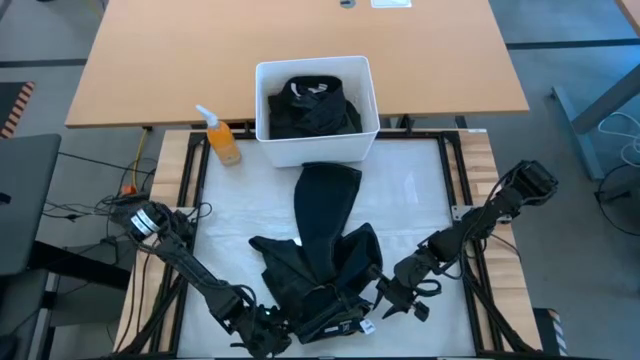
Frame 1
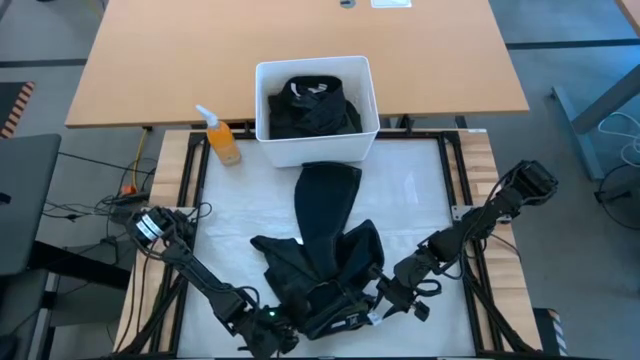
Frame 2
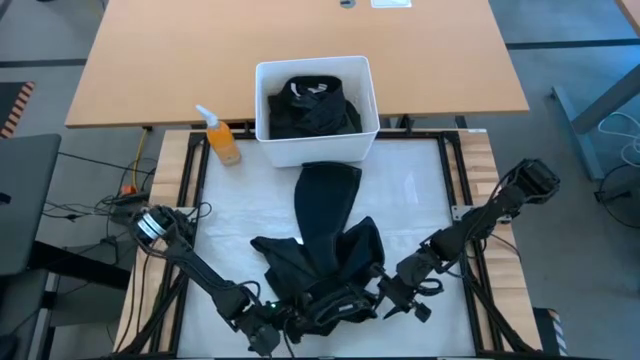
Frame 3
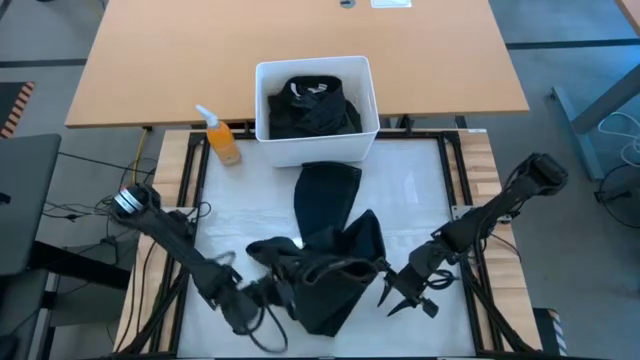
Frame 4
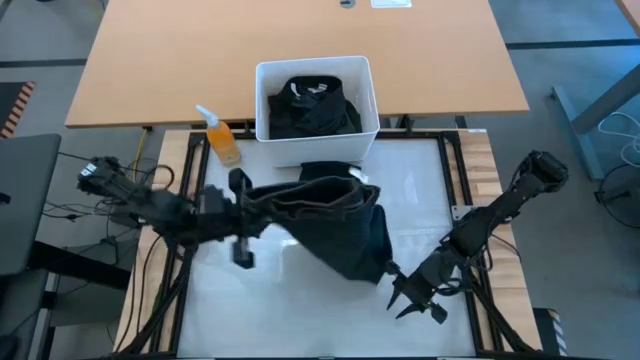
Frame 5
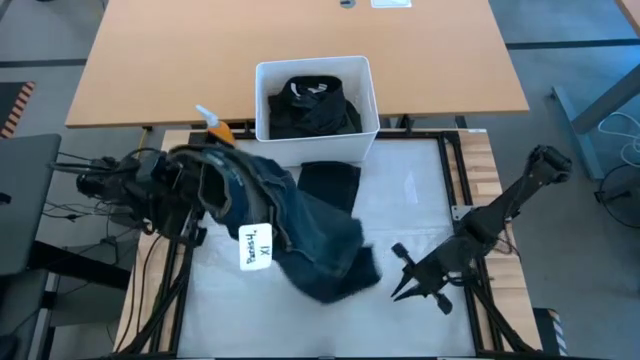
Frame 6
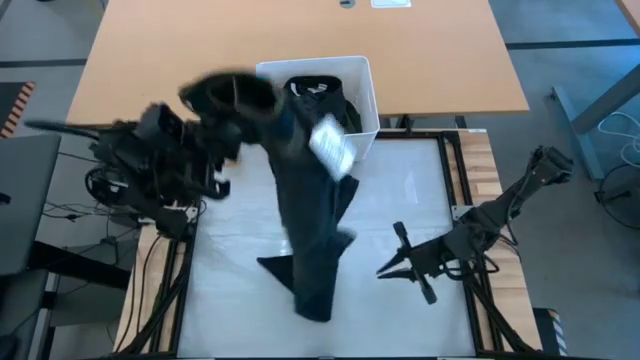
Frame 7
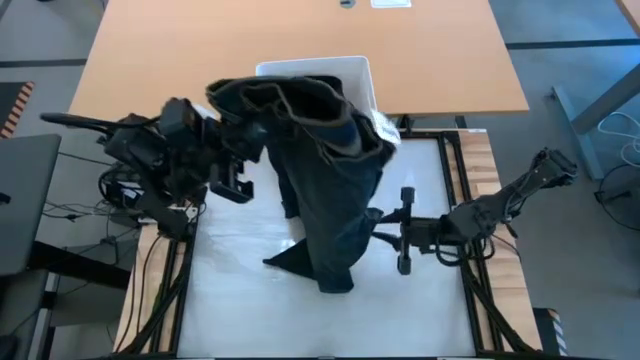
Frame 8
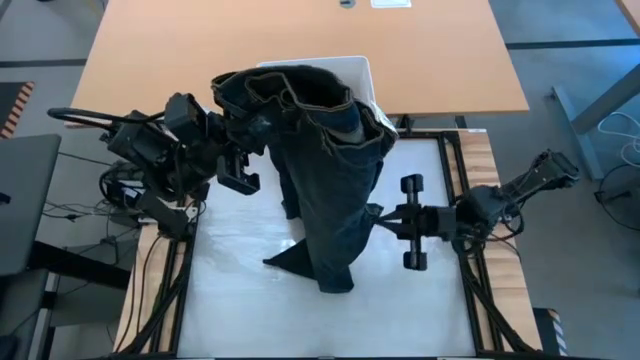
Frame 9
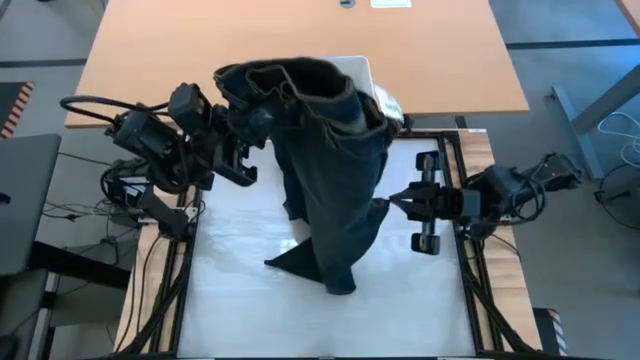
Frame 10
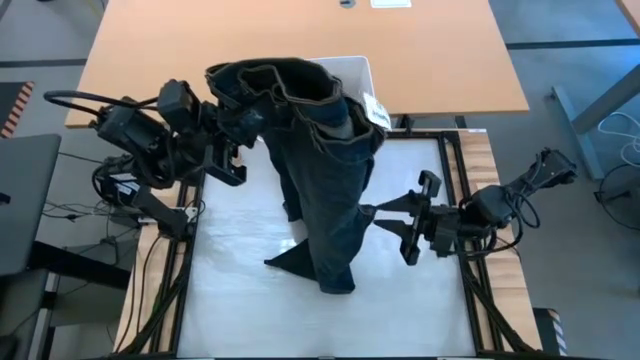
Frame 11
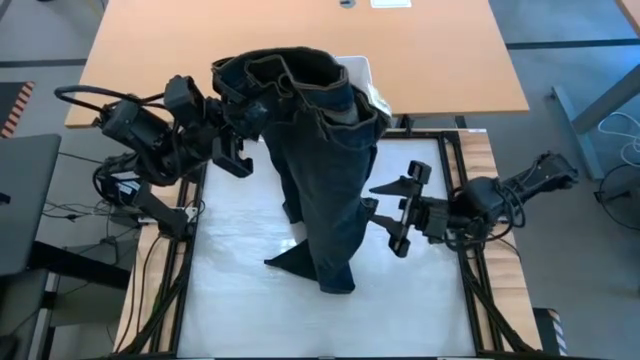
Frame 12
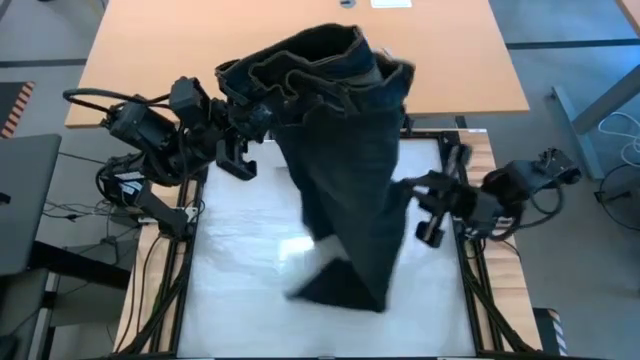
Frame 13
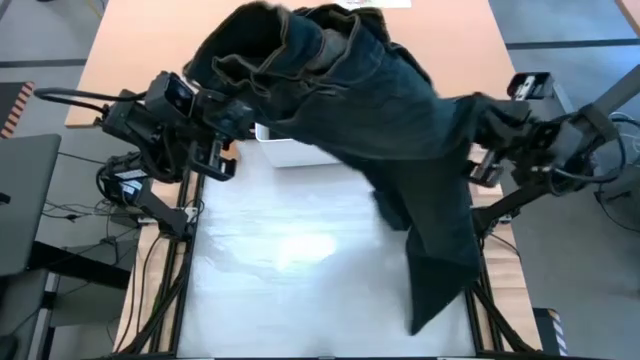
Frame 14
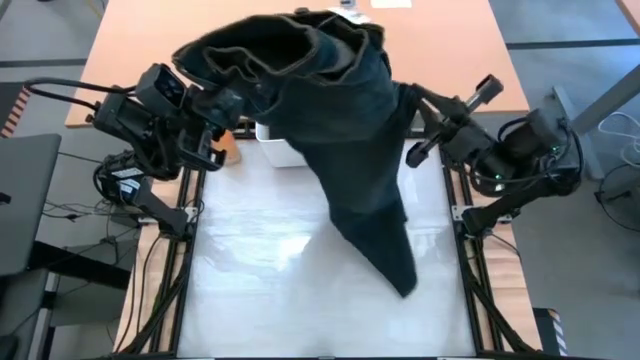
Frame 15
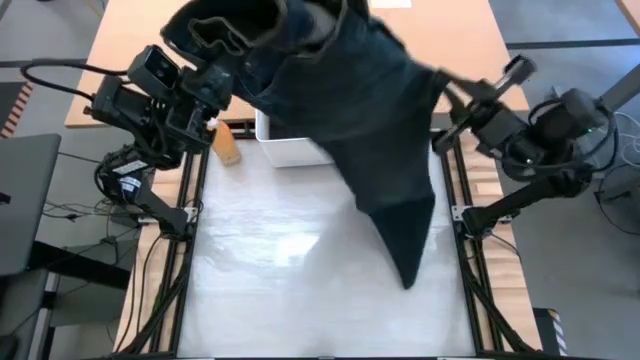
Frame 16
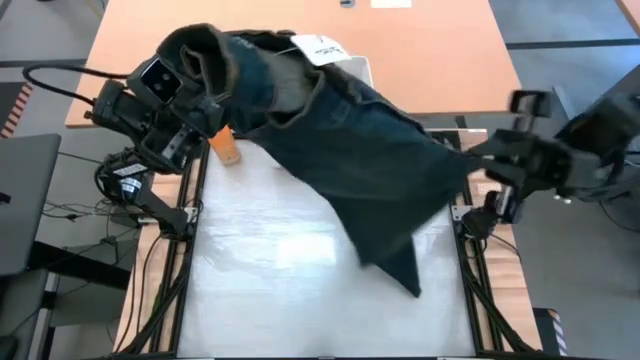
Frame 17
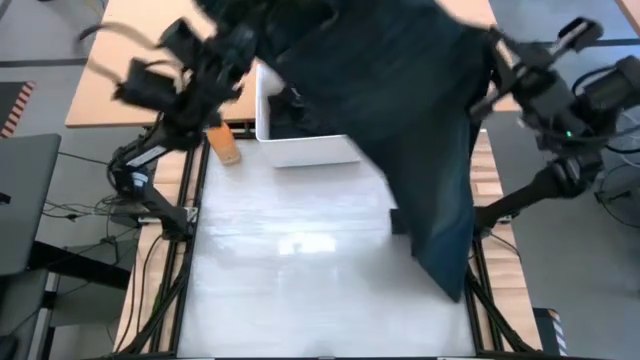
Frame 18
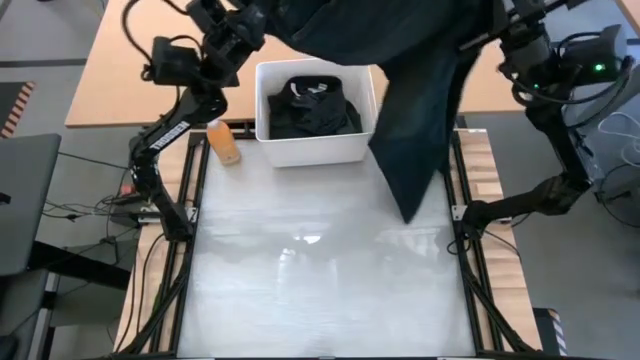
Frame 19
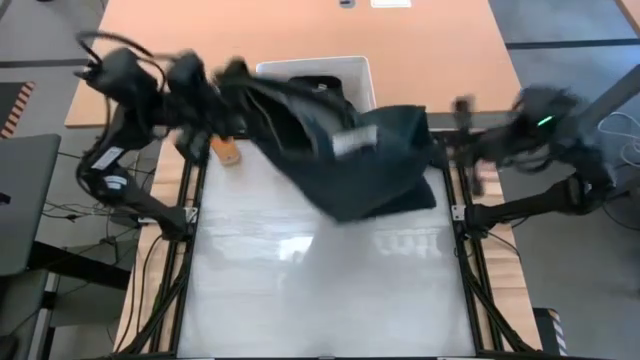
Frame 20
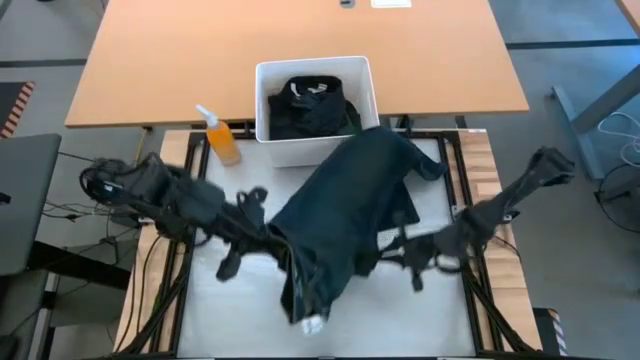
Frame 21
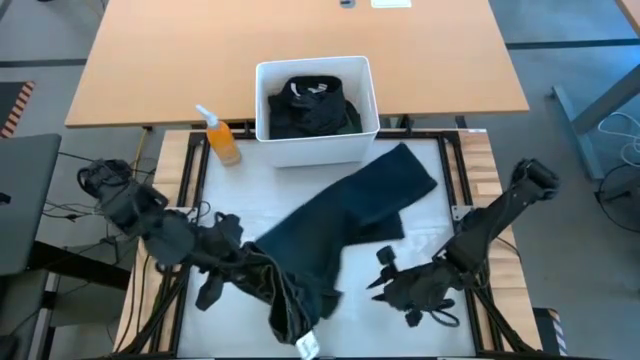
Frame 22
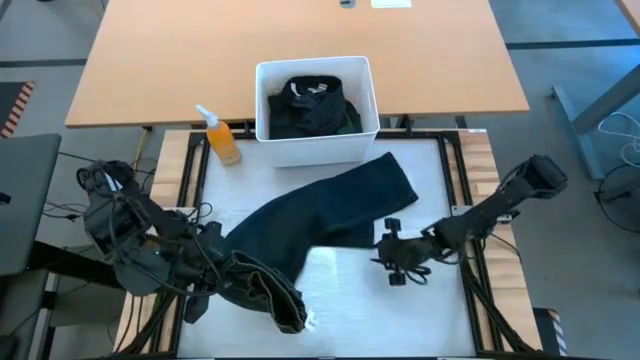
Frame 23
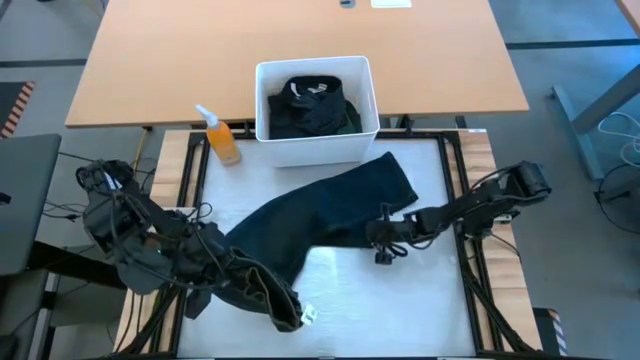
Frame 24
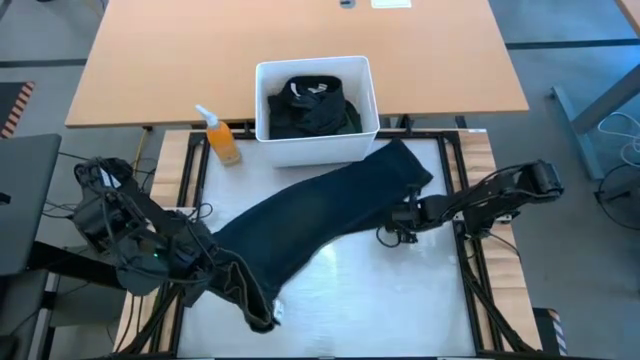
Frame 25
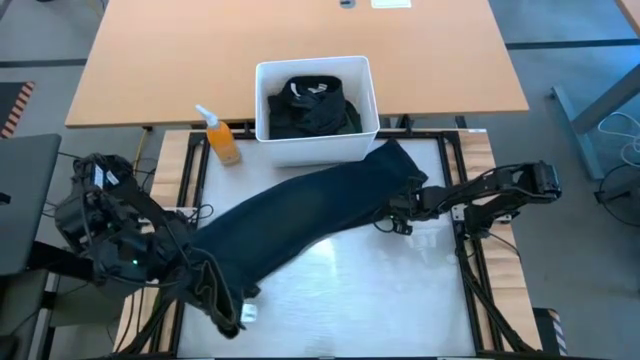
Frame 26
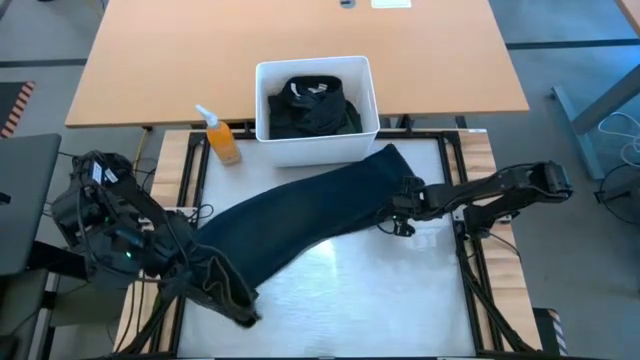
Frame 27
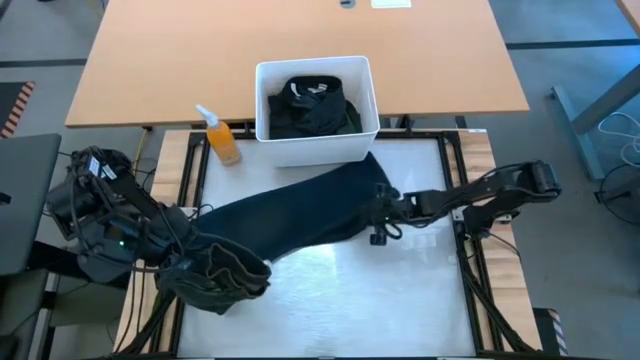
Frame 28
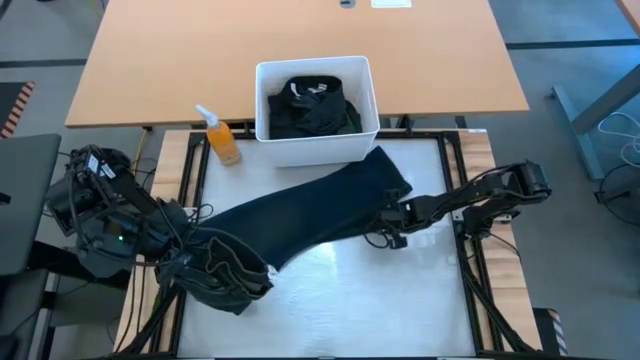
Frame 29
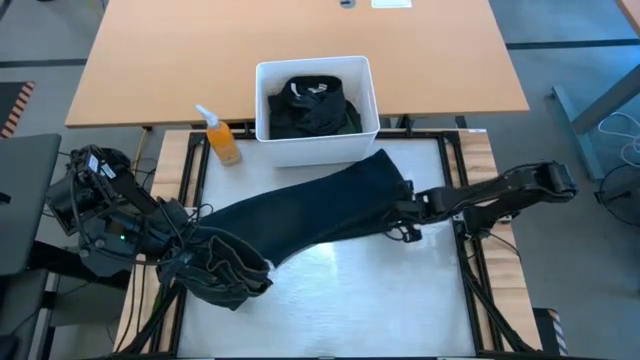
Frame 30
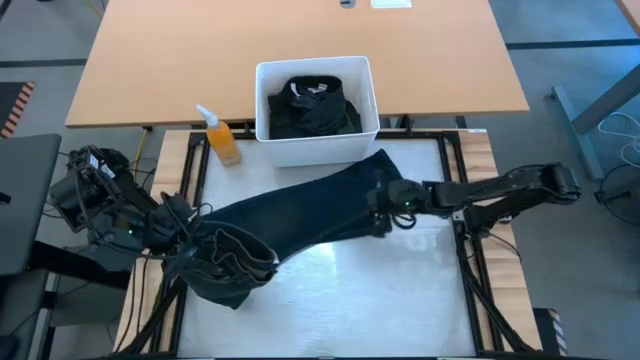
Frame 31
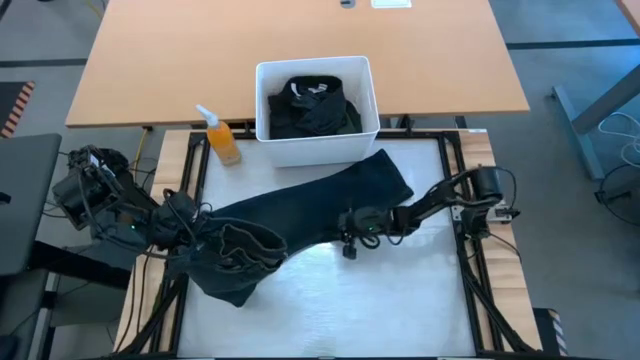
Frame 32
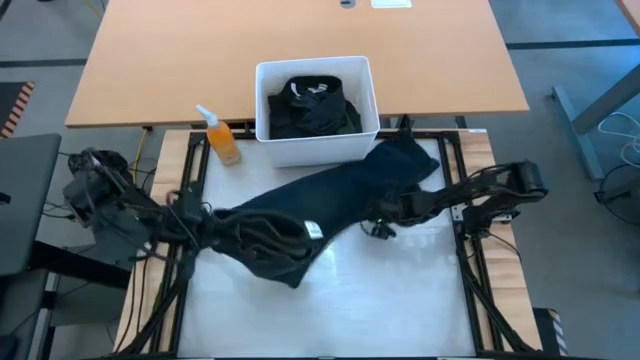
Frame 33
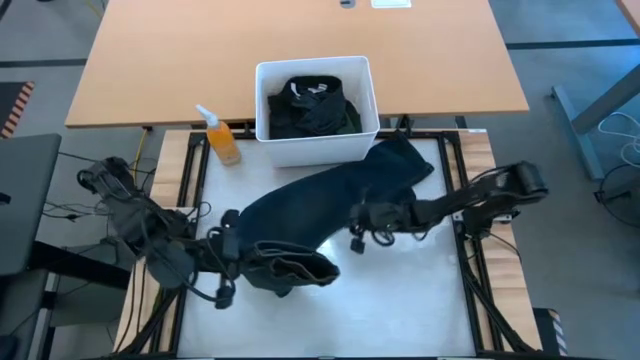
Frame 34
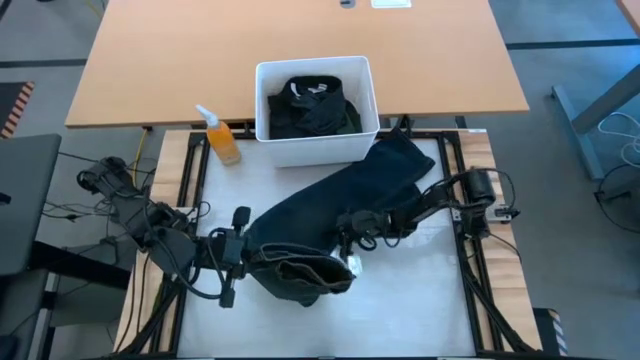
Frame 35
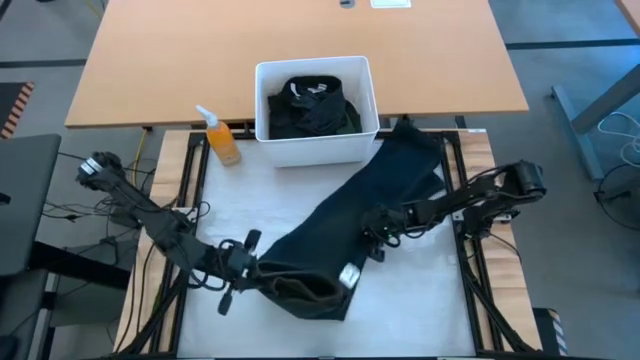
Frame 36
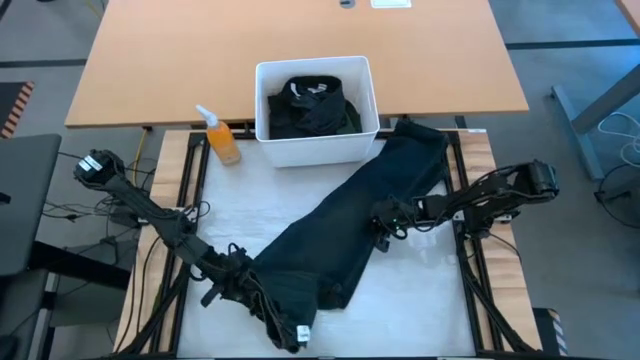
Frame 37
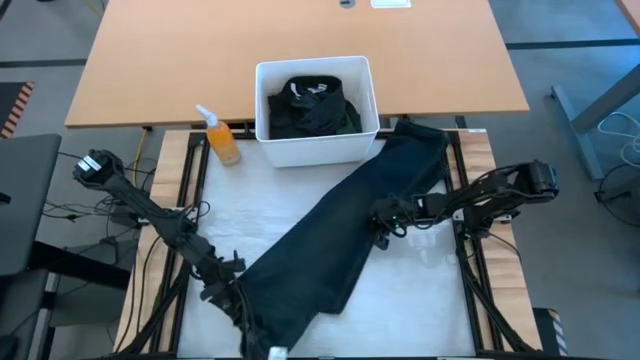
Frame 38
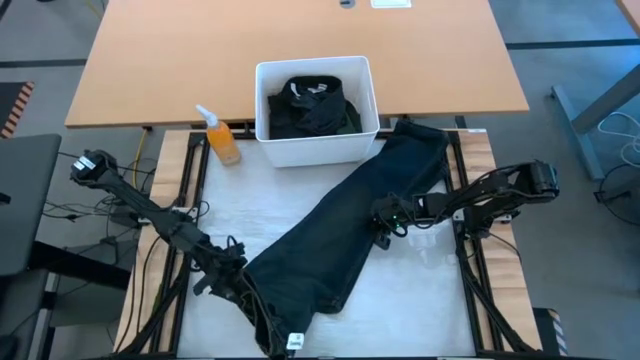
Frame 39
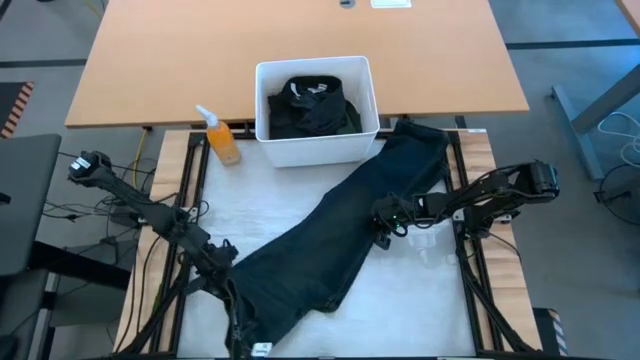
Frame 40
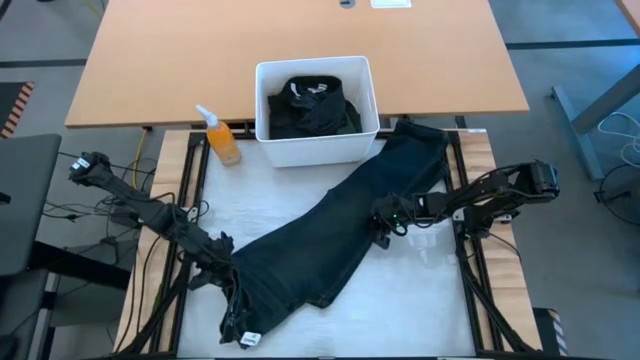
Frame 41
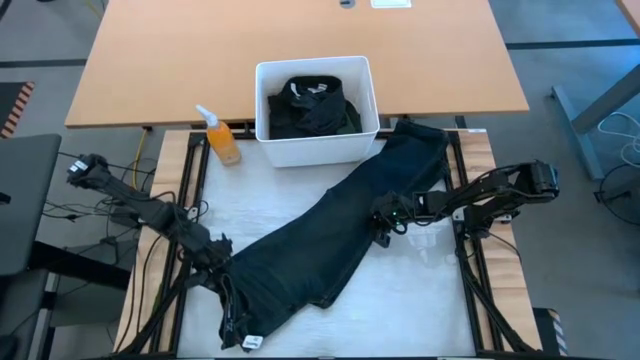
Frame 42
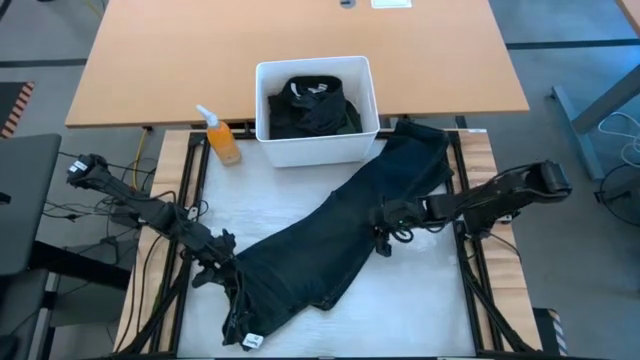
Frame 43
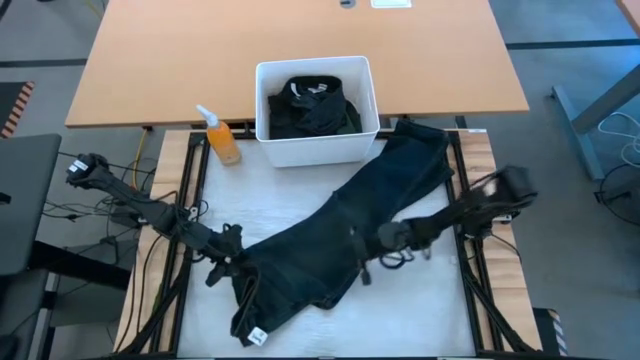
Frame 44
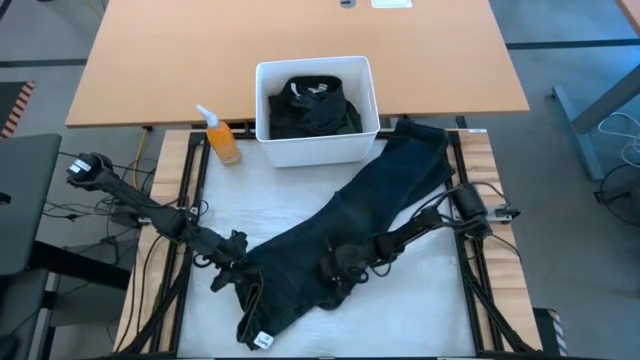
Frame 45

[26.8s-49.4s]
Task: Fold laundry
Fold the dark blue jeans from the white laundry organizer
